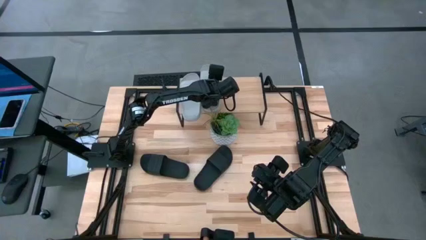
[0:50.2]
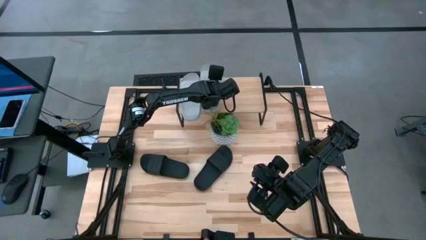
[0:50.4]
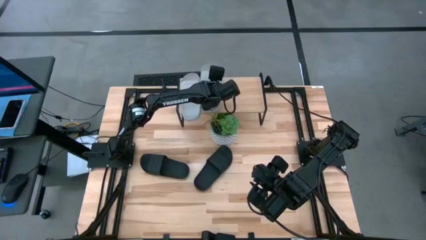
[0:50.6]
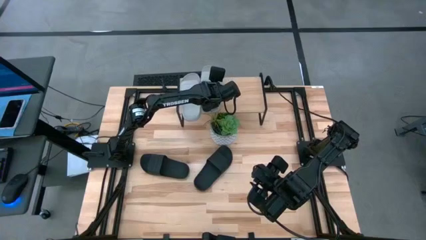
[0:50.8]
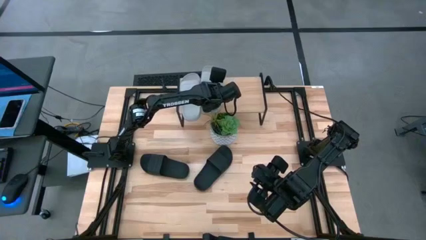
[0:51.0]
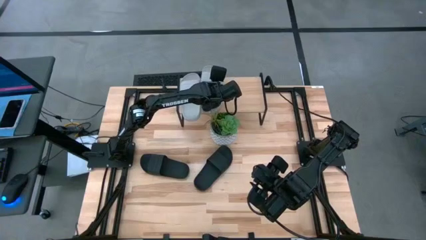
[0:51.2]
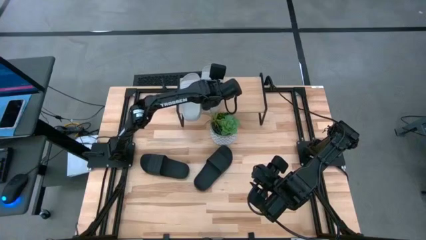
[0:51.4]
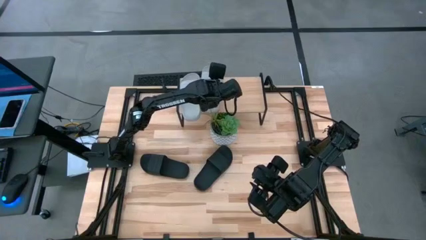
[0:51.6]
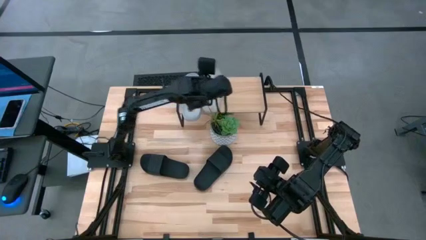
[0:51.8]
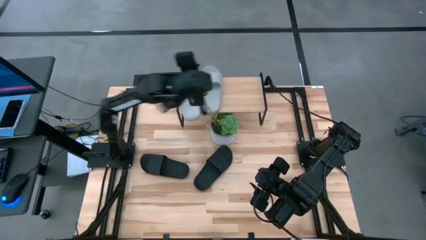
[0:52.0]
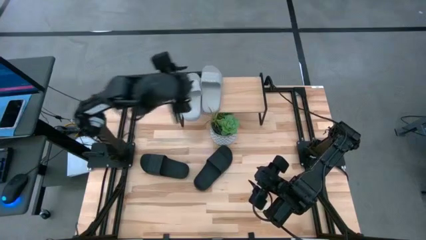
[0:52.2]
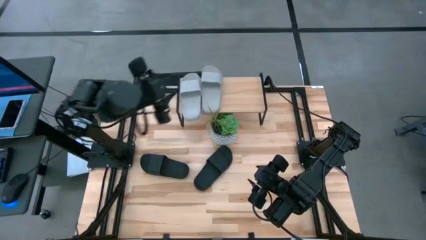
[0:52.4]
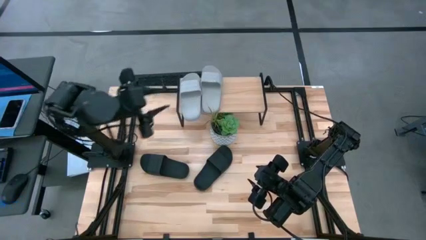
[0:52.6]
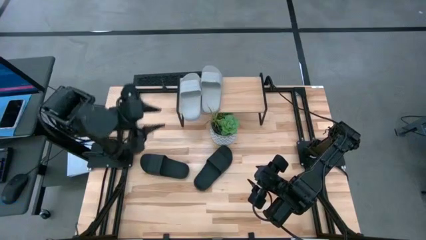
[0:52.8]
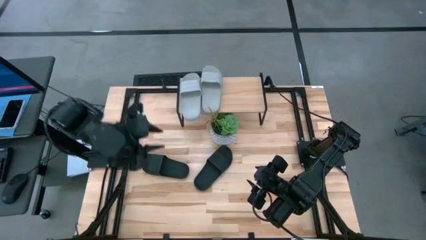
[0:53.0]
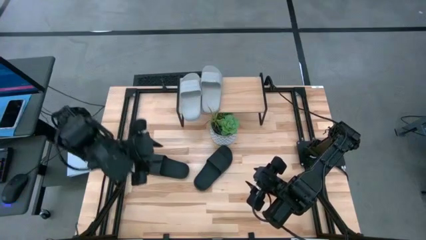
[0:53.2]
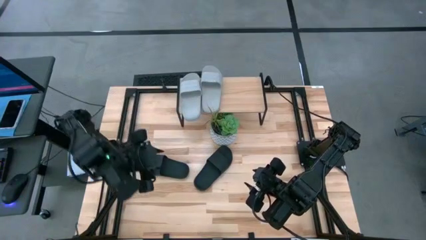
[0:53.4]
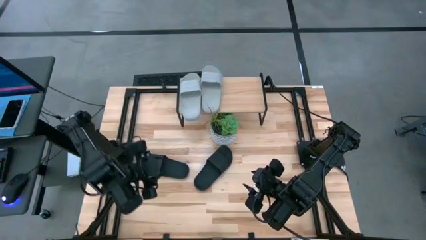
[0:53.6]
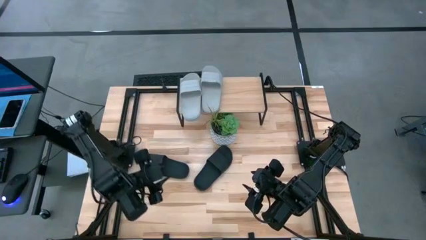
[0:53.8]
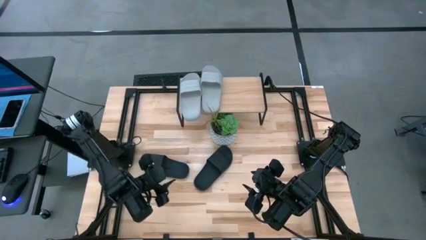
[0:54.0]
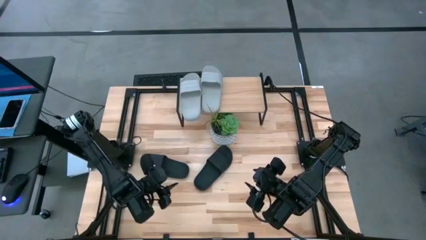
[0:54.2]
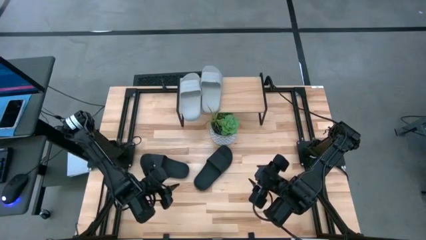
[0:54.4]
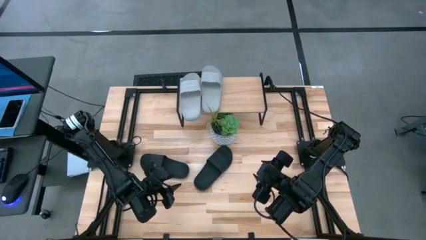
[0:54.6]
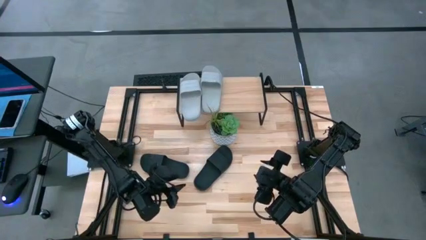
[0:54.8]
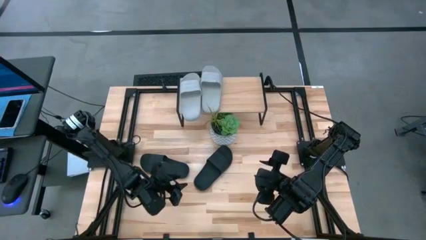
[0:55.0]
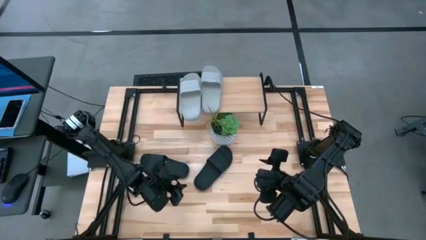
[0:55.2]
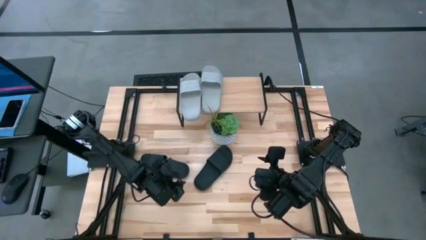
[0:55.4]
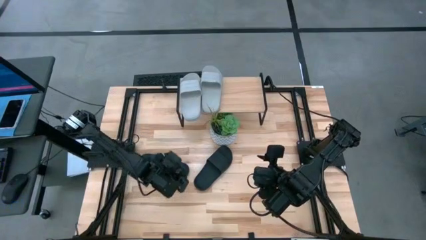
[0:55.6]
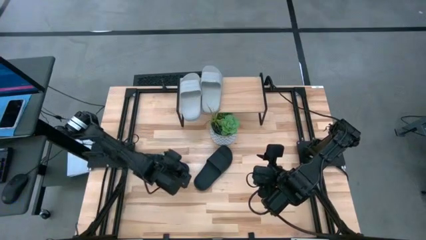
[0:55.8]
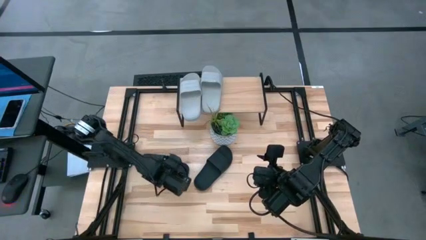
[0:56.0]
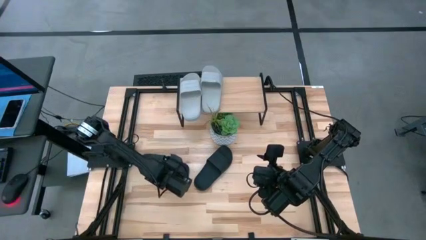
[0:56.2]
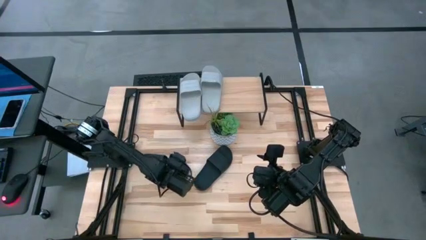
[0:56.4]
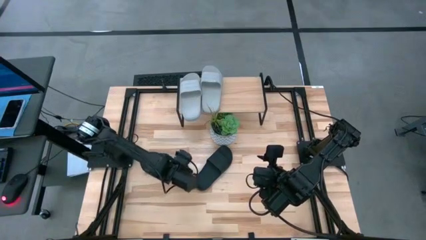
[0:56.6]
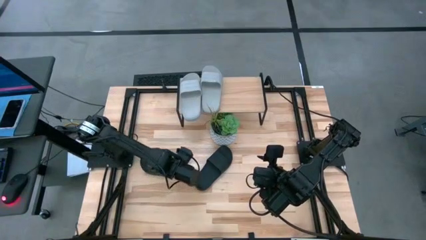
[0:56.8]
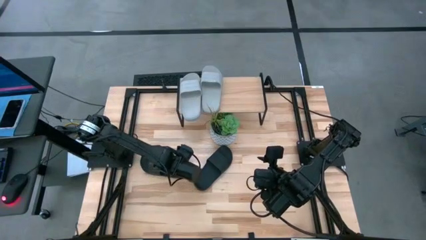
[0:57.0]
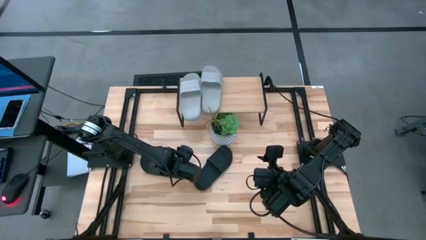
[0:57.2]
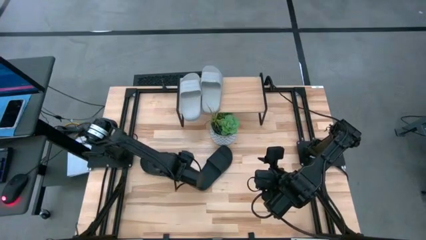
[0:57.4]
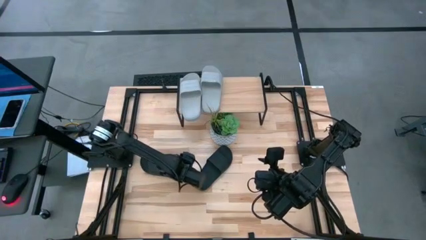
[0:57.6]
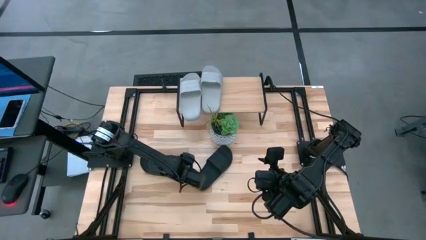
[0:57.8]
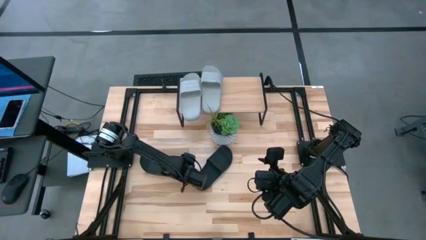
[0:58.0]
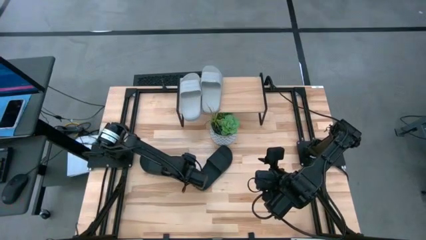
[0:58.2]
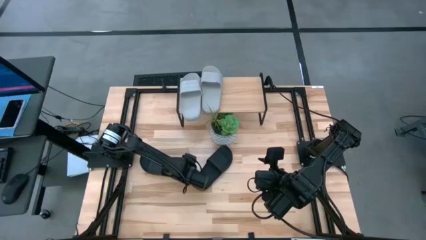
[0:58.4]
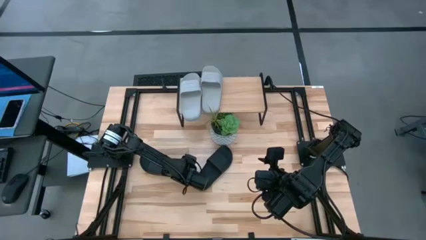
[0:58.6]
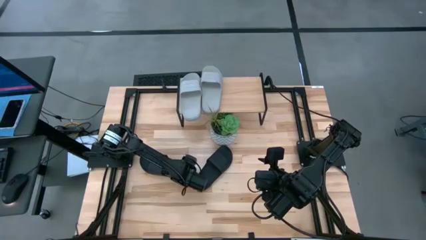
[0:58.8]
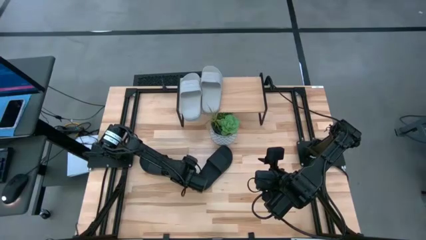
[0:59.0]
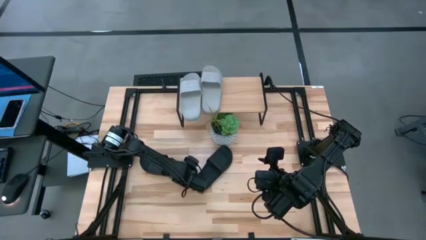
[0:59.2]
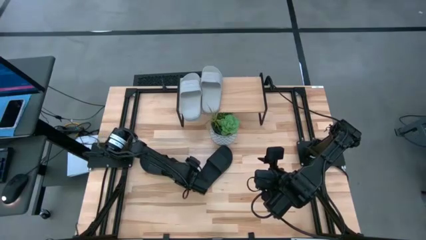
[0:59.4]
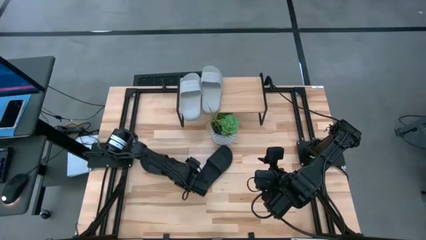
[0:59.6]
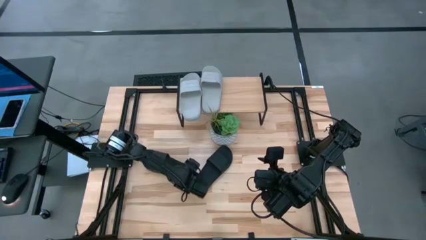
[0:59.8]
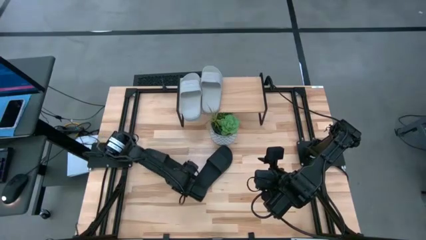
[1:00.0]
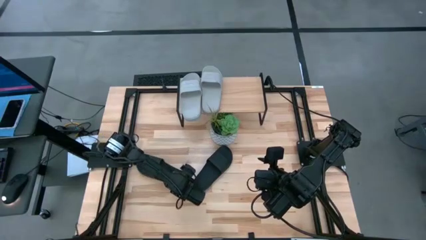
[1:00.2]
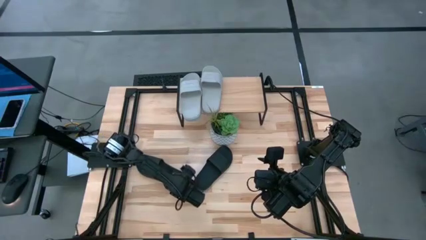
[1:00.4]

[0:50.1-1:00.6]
Task: Pick and place slides into the shelf
Put the left black slide on the shelf

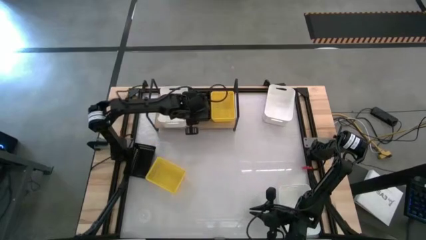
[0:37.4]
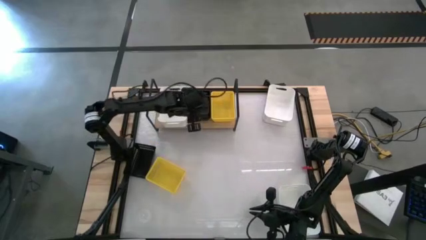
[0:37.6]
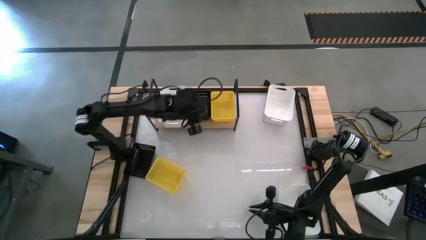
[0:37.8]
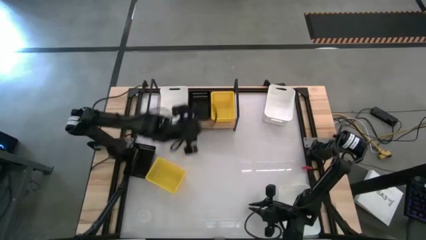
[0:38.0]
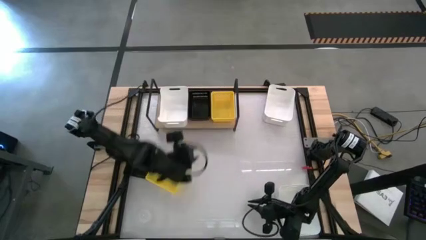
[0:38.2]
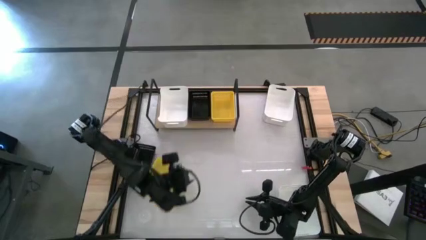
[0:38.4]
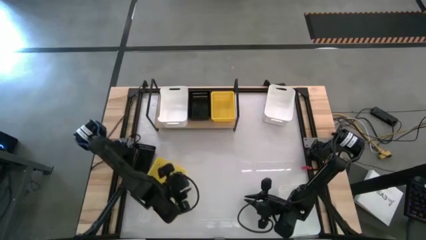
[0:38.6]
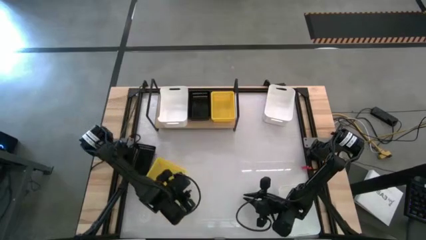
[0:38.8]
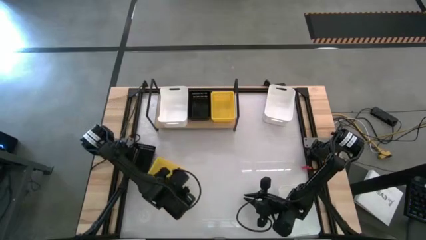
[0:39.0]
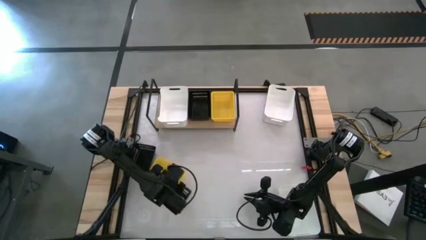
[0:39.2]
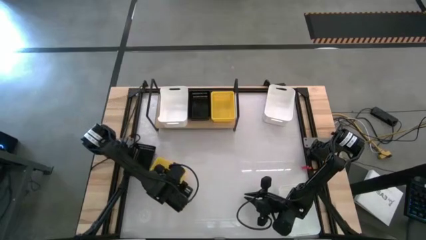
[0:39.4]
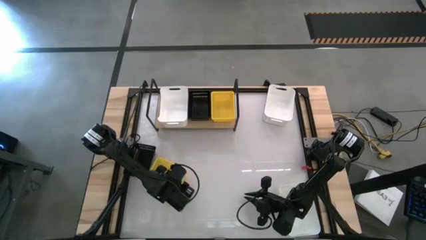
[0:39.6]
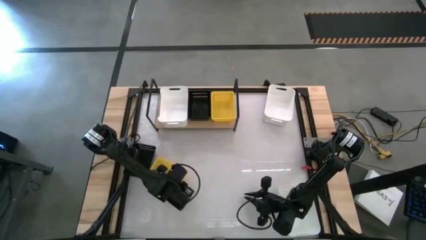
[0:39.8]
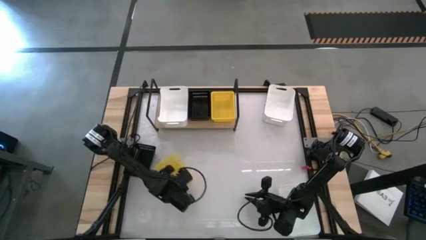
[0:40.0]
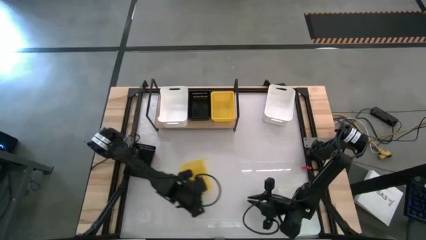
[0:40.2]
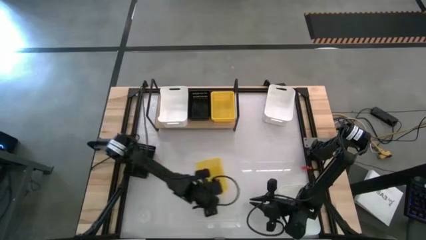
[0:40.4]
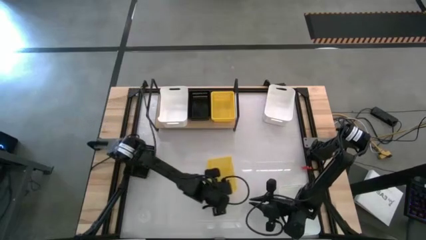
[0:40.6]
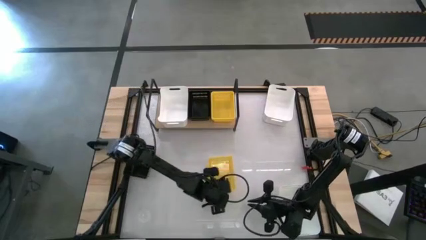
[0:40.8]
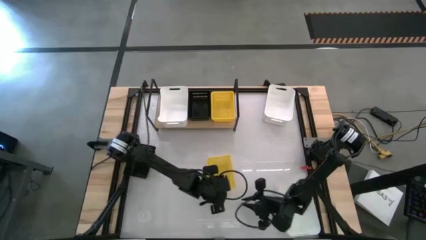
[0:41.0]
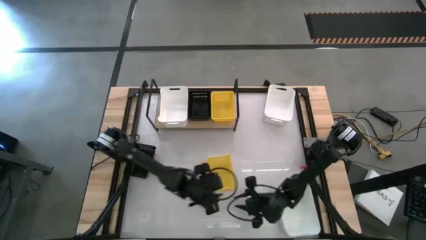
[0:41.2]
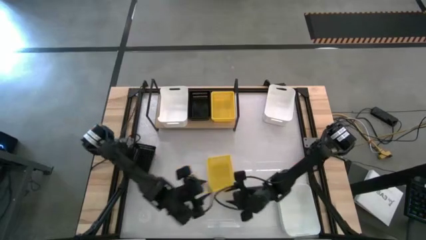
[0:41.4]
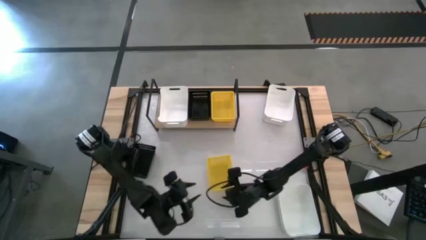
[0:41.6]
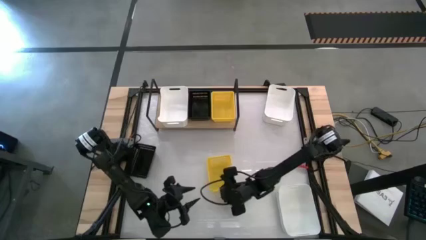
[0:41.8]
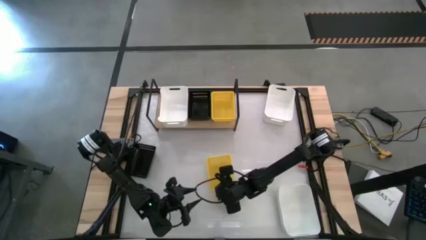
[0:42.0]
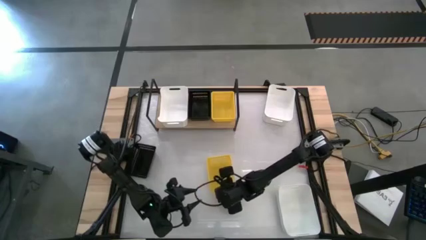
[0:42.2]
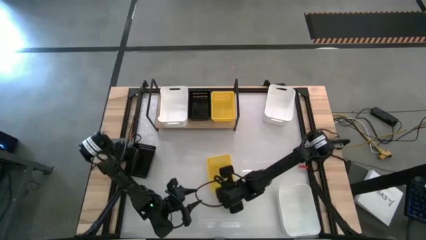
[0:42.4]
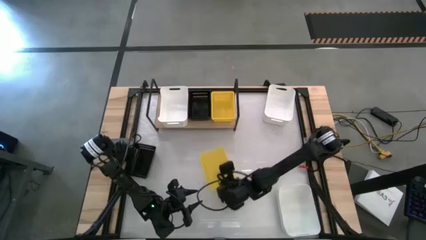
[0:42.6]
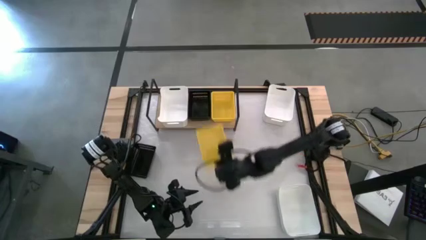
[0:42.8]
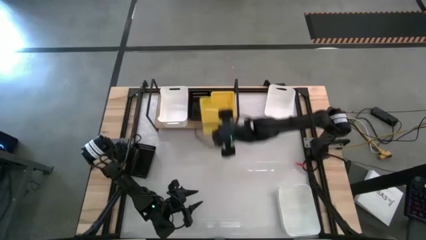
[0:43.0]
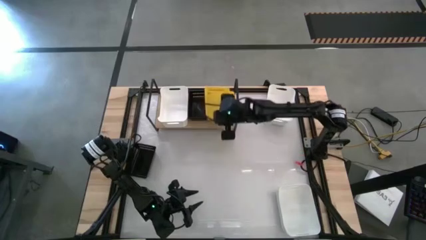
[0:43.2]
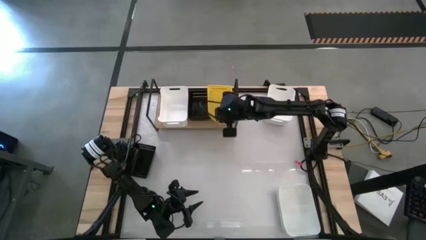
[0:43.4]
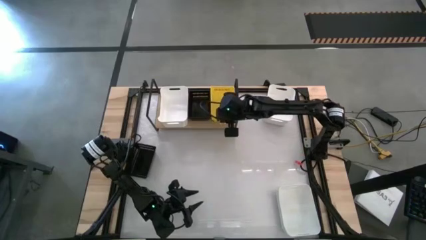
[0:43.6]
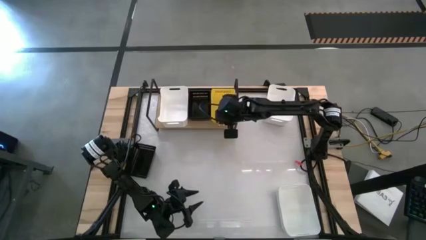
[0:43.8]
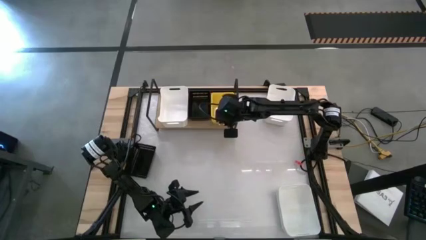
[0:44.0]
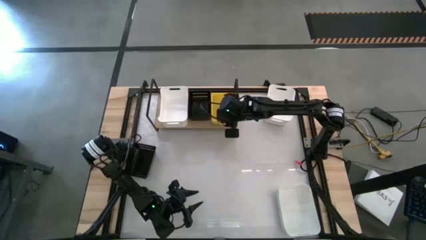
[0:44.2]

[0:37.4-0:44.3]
Task: Stack baskets on shelf by color
Stack the yellow bin on top of the yellow bin
